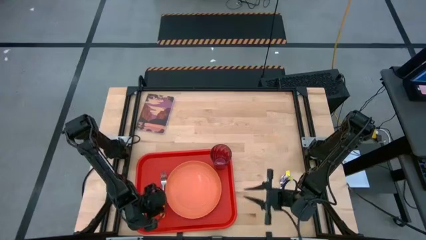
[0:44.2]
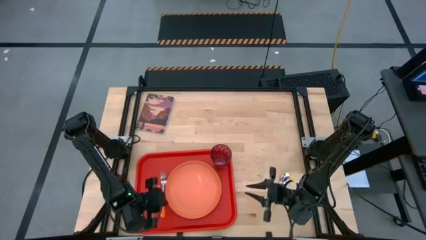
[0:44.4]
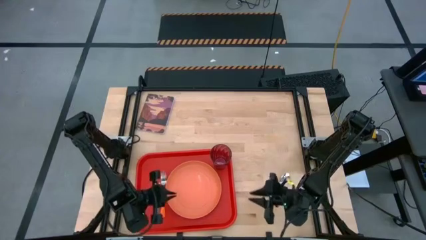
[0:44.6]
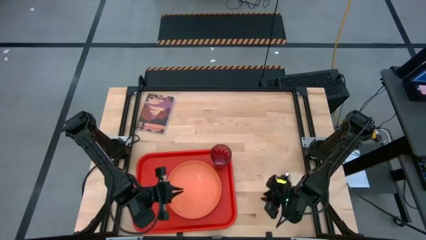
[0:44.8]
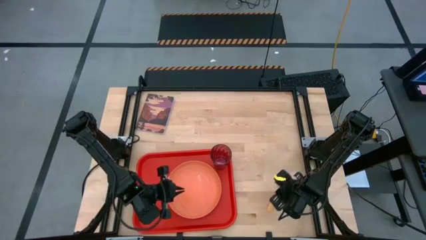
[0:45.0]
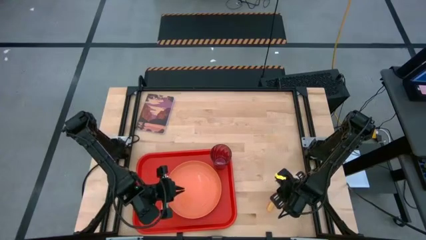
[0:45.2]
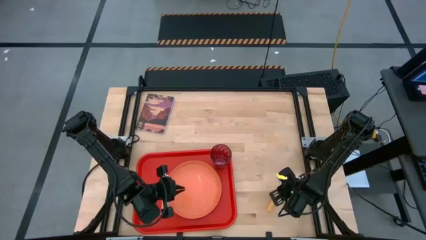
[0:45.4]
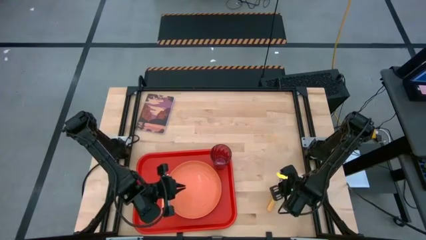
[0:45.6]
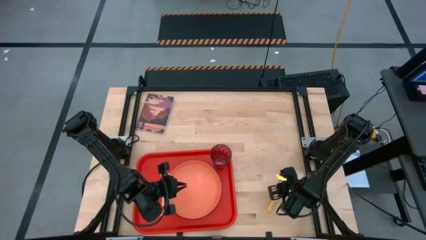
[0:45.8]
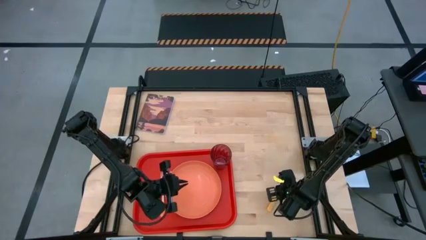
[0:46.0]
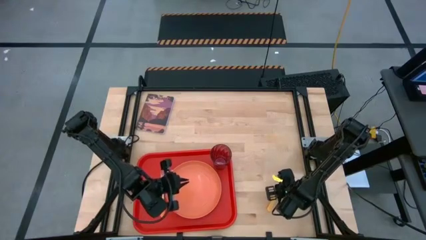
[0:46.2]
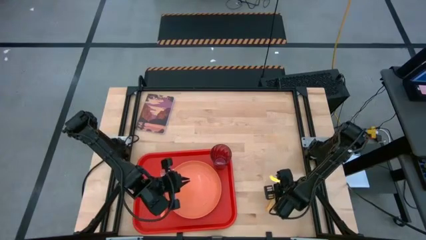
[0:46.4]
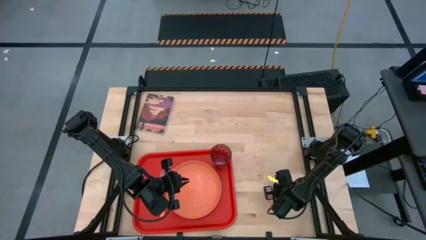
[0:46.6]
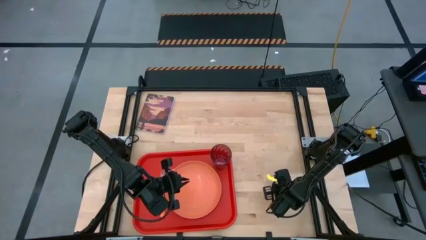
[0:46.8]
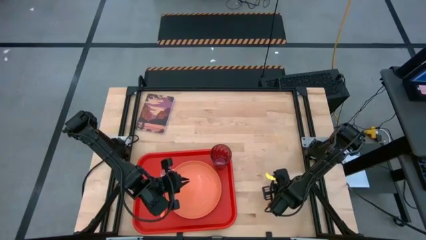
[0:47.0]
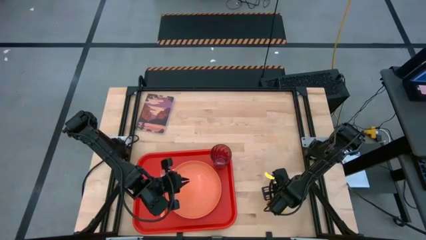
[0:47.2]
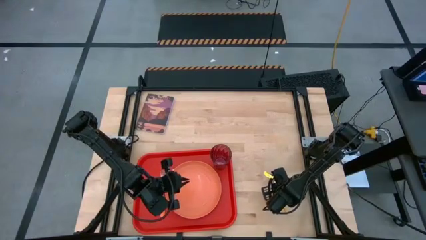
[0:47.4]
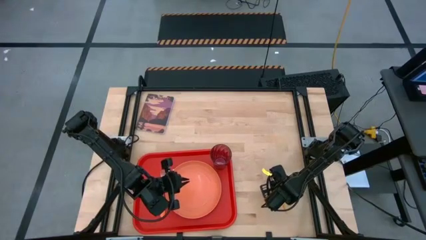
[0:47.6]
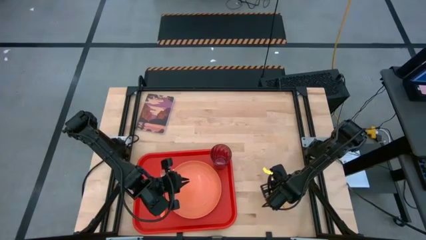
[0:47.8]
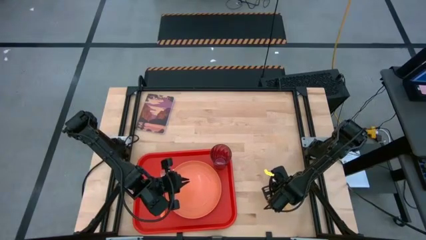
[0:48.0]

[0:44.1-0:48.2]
Task: Pick and place plate/cup/fork/spoon on tray
Put the yellow spoon on the red serving tray to the left of the orange fork

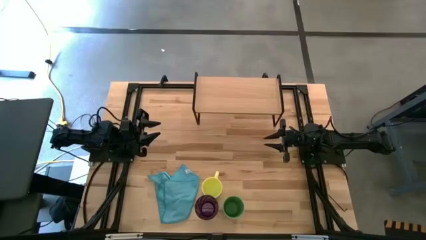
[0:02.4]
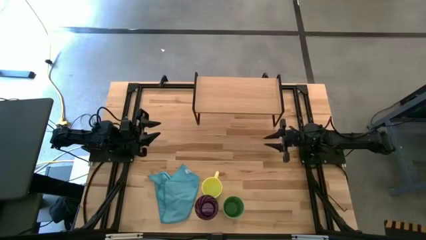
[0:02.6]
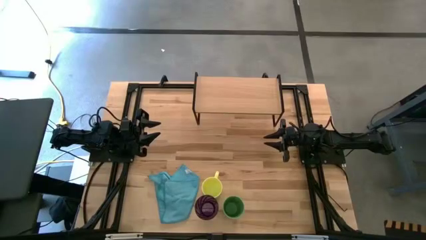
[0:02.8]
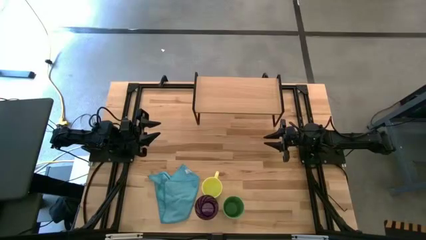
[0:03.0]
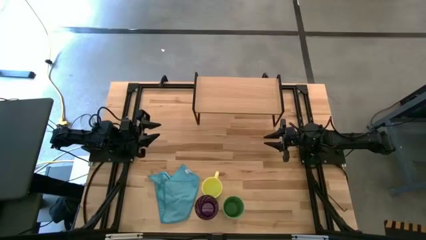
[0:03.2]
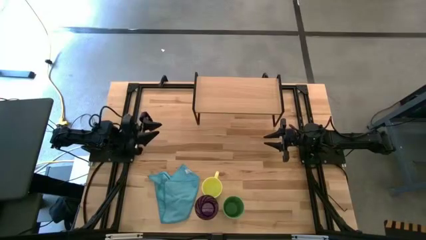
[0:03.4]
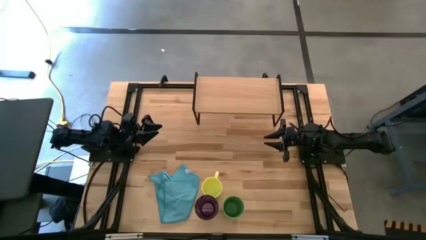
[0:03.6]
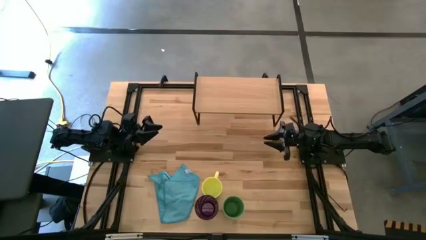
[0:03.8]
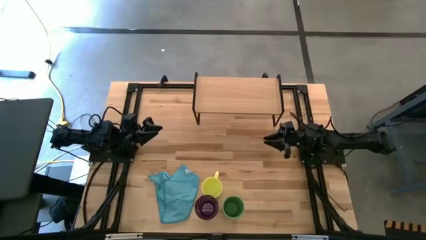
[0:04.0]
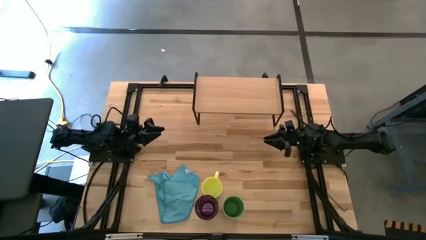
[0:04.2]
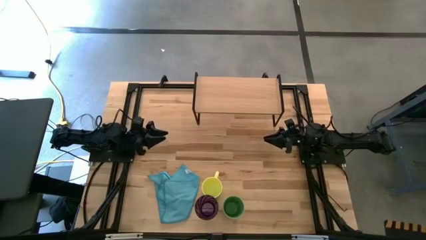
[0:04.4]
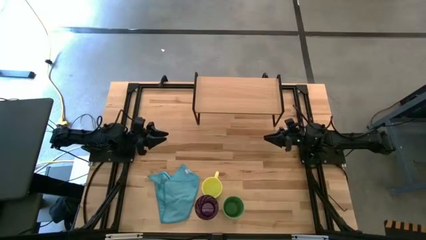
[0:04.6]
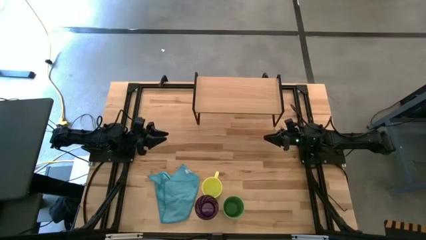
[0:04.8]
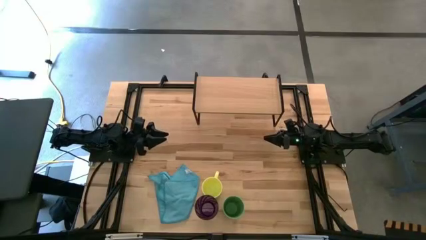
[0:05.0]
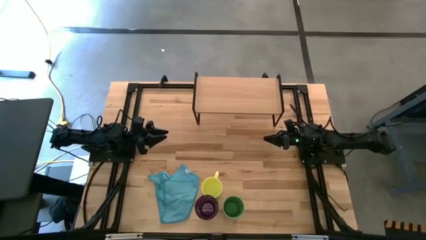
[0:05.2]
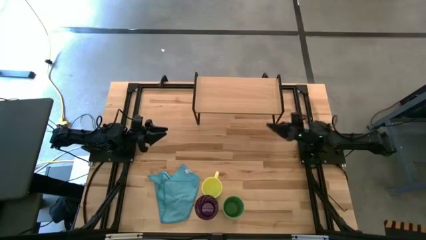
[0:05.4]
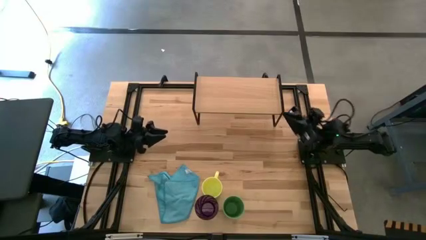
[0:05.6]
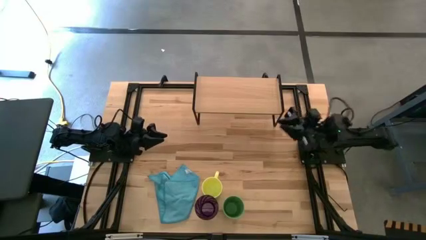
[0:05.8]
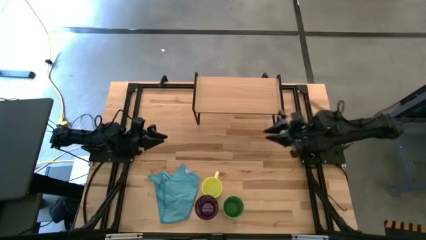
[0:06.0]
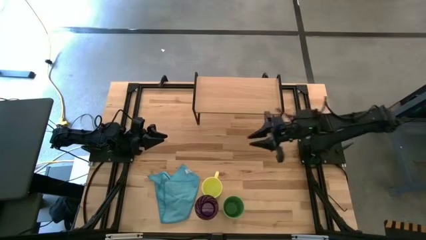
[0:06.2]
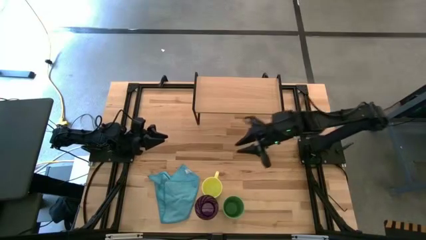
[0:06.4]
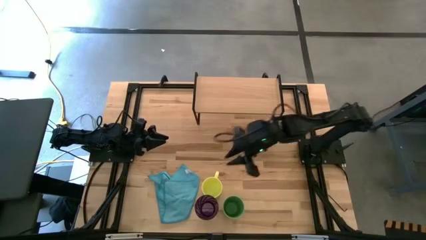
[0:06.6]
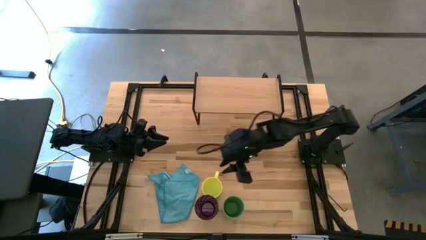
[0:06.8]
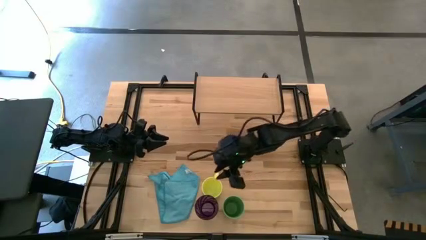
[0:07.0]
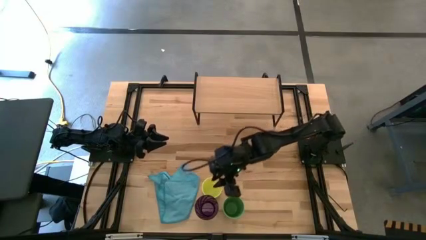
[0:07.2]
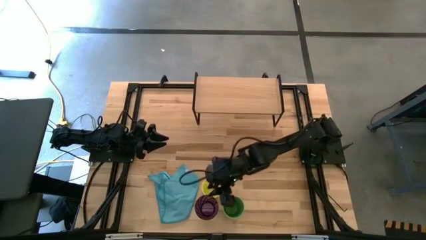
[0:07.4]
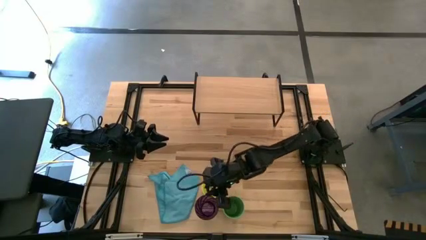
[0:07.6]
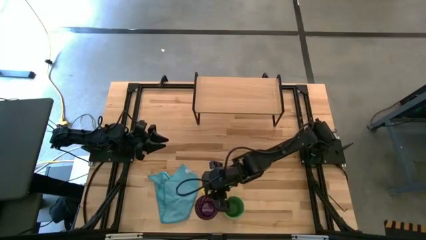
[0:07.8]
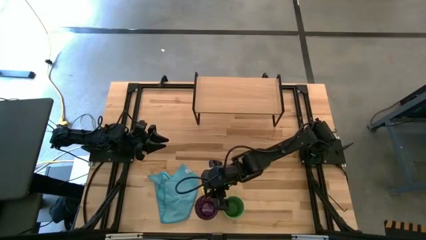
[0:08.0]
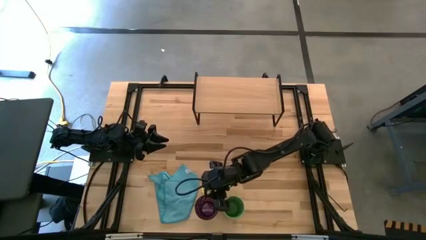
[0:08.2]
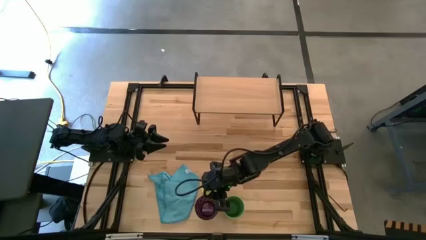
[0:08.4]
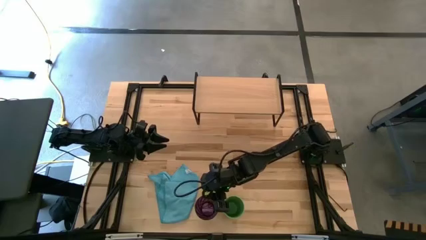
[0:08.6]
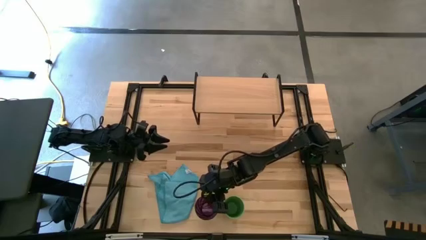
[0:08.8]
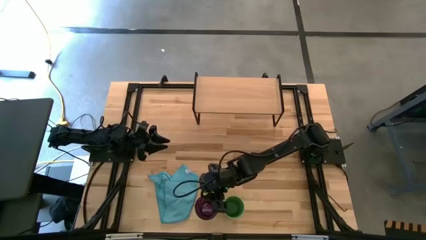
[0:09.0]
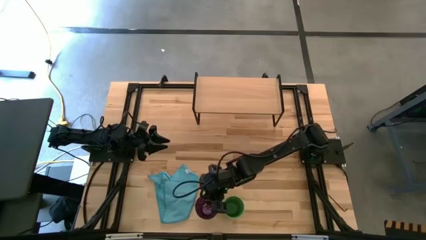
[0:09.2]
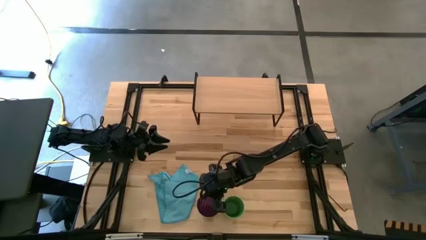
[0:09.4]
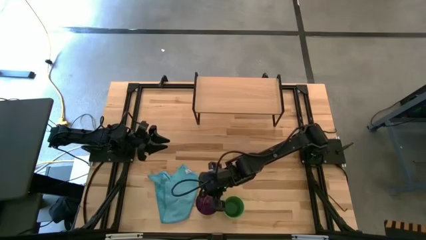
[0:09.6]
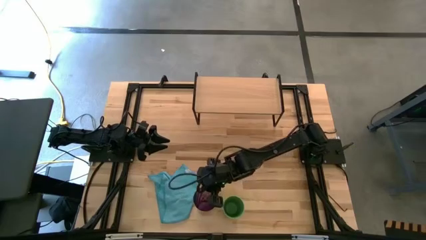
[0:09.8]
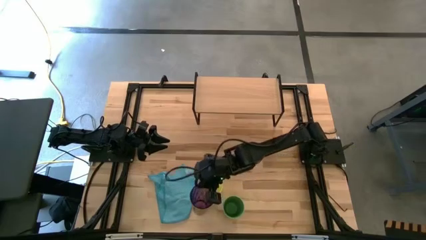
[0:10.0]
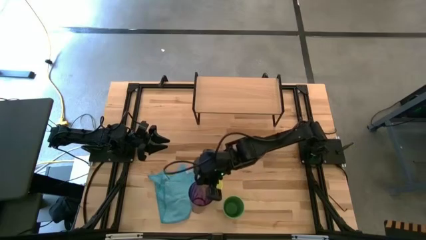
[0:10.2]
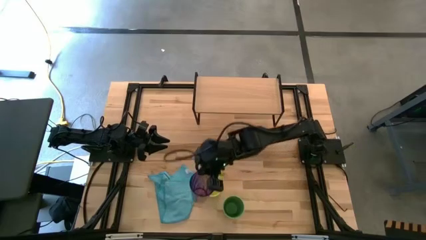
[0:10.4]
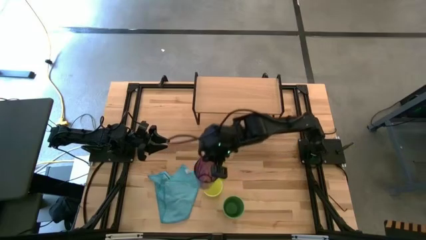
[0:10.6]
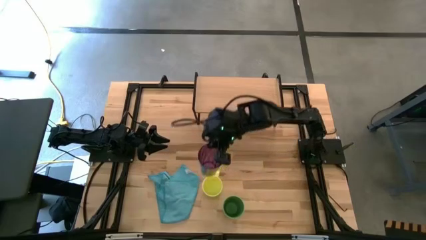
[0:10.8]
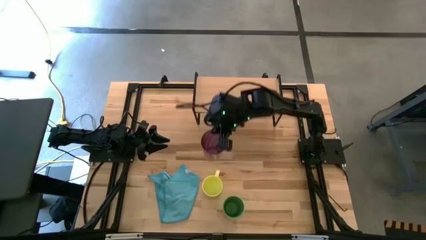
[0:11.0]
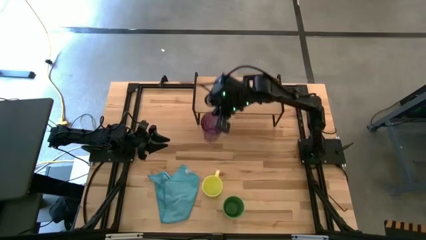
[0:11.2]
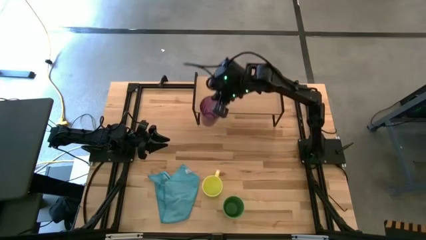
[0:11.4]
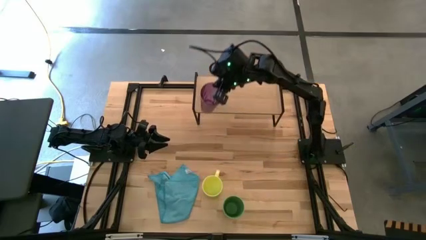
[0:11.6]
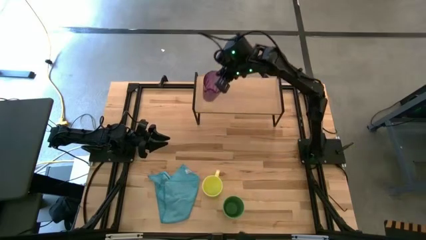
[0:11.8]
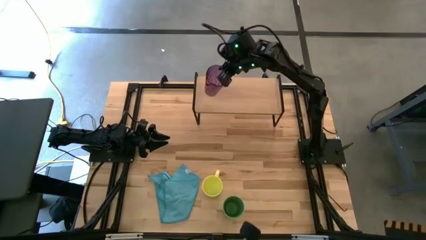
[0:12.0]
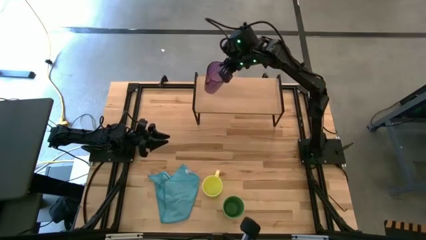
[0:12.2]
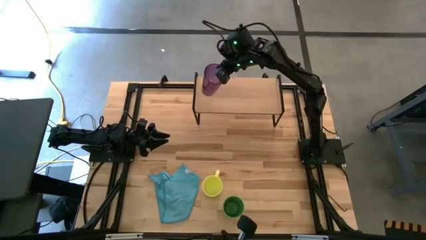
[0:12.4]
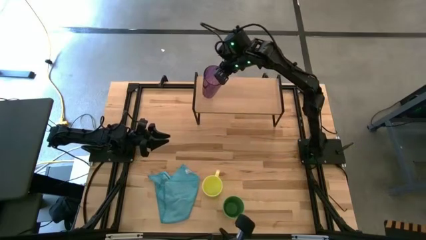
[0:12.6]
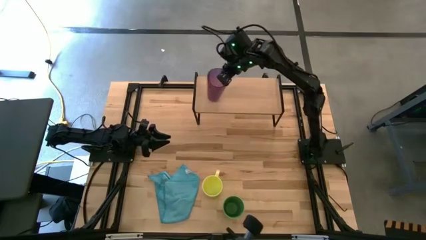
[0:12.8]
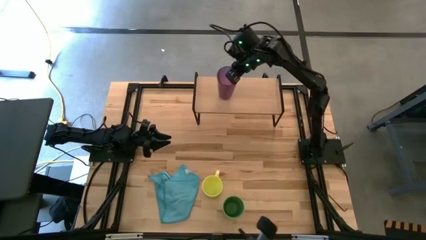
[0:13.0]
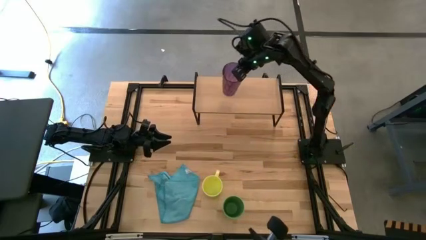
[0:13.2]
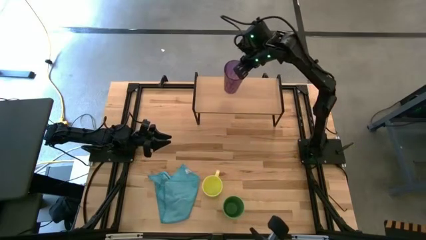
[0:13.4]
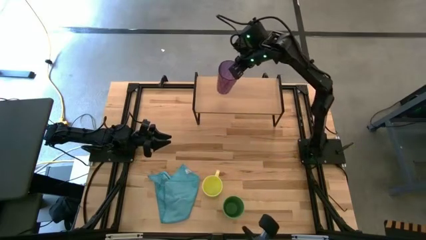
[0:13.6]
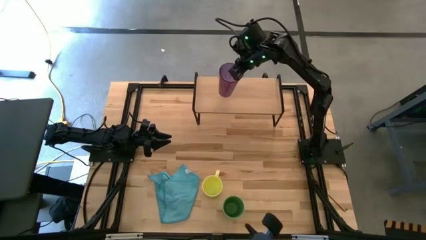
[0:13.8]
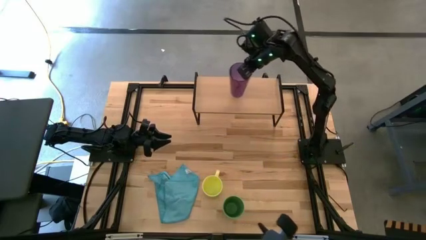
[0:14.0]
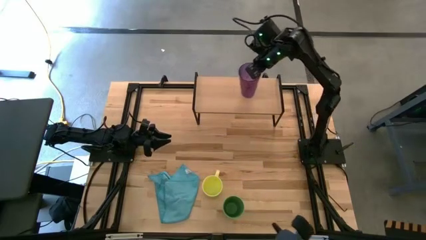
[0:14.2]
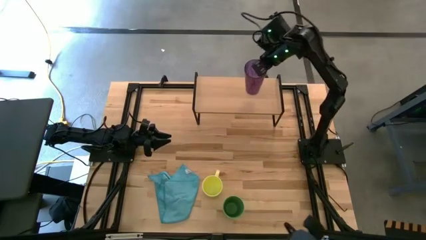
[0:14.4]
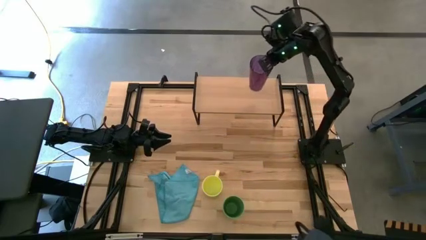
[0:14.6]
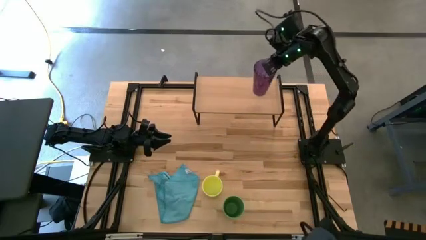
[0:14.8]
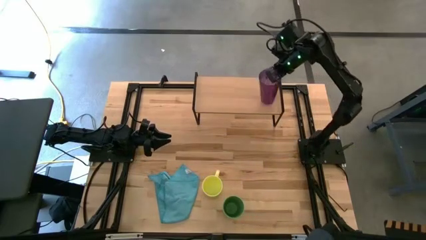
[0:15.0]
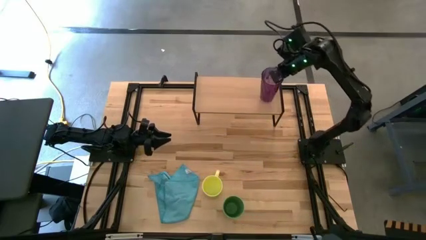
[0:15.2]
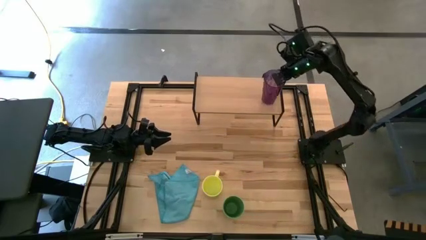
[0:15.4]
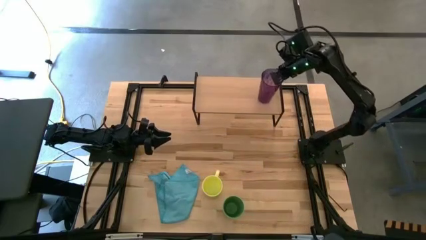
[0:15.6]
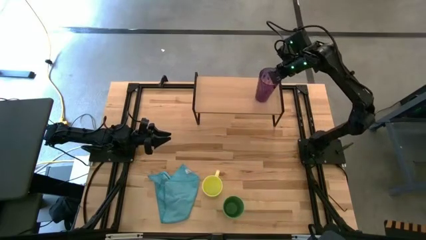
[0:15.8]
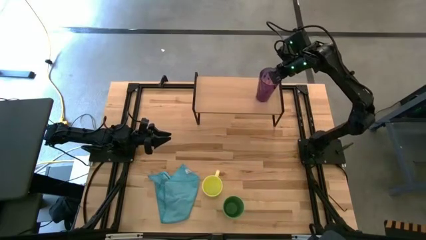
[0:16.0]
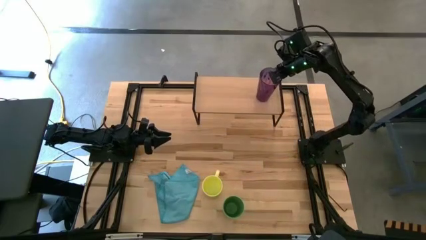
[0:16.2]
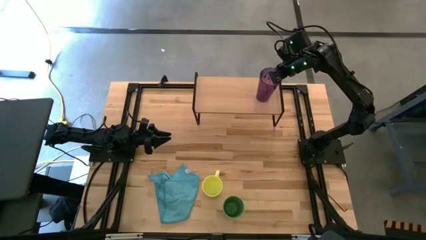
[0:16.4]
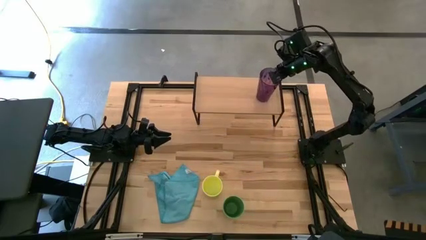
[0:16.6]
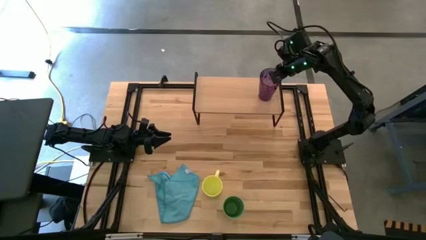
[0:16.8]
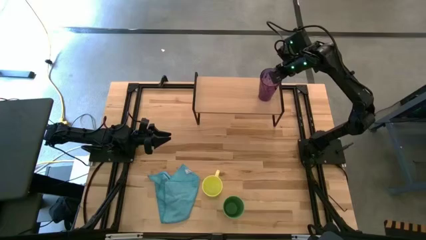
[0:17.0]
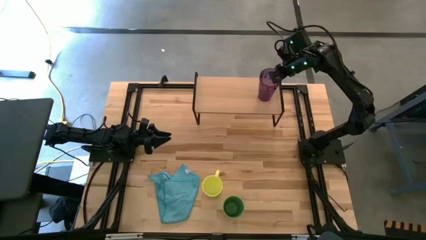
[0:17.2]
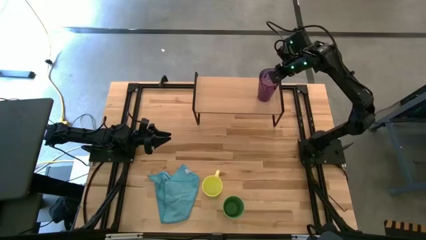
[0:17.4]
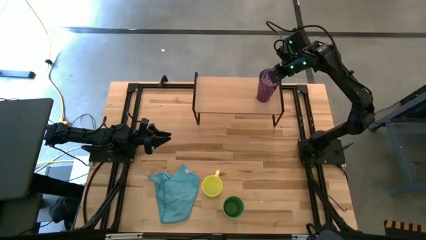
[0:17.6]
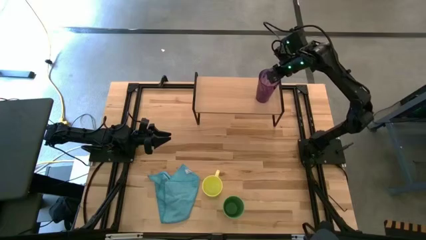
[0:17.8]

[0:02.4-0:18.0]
Task: Stack small to large cups/mugs on shelf
Put the purple cup on the shelf
